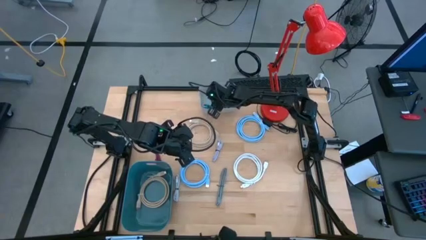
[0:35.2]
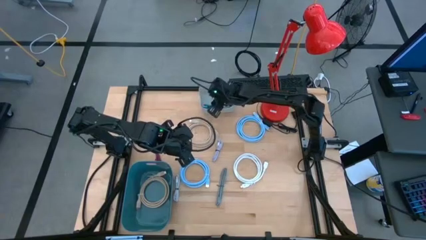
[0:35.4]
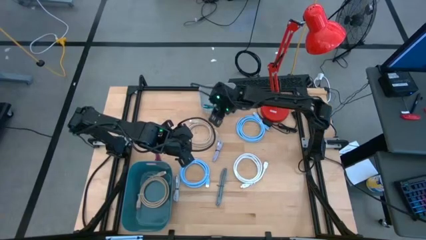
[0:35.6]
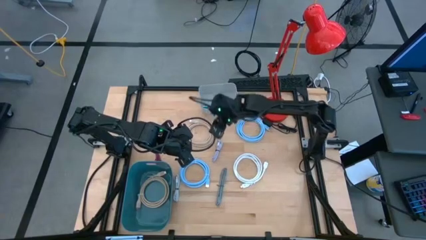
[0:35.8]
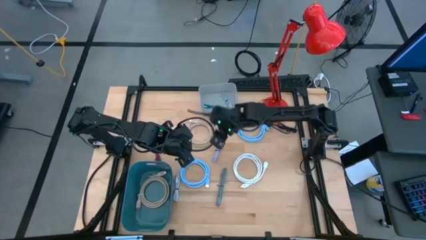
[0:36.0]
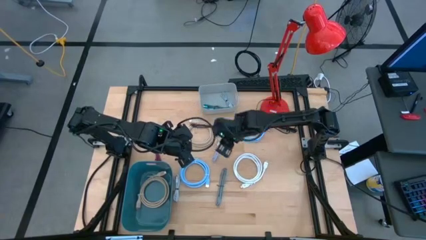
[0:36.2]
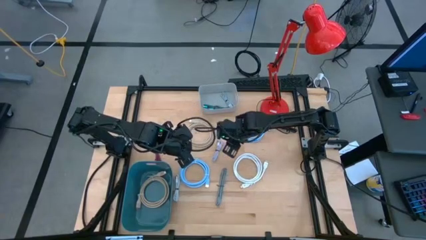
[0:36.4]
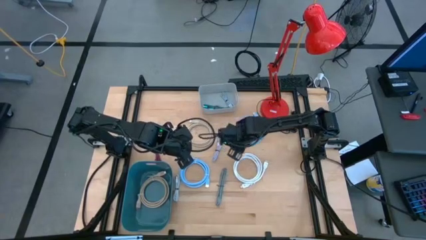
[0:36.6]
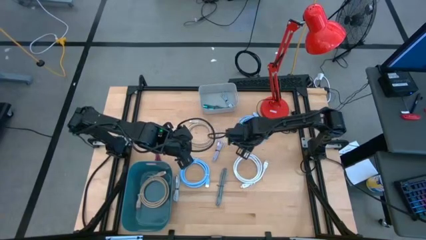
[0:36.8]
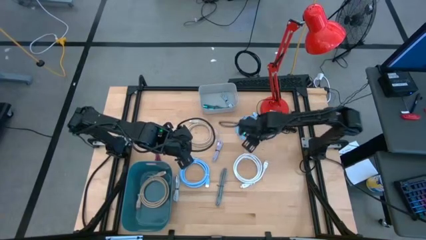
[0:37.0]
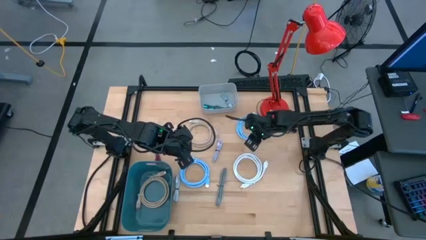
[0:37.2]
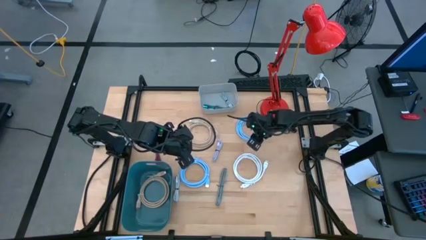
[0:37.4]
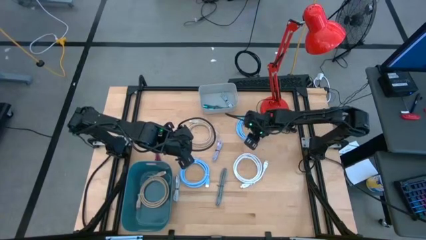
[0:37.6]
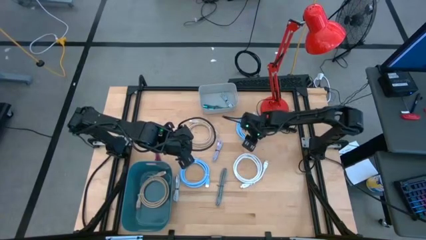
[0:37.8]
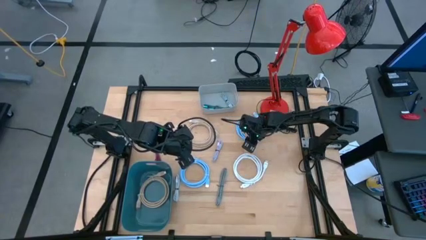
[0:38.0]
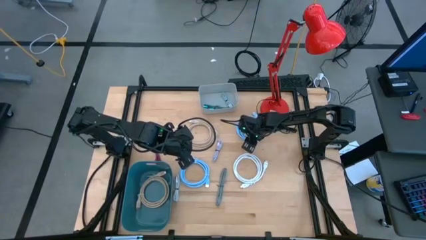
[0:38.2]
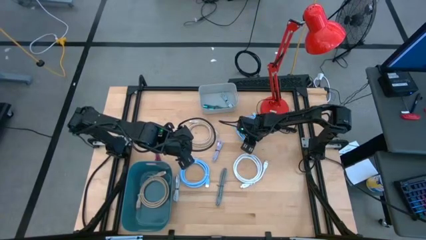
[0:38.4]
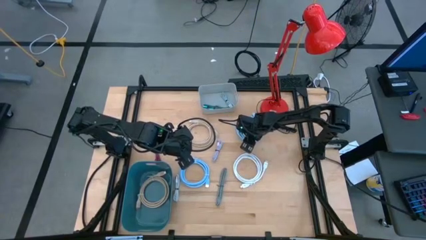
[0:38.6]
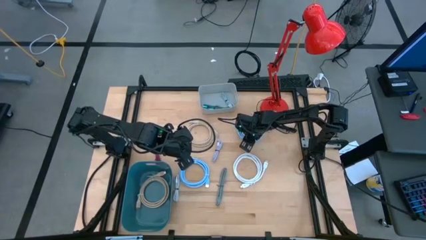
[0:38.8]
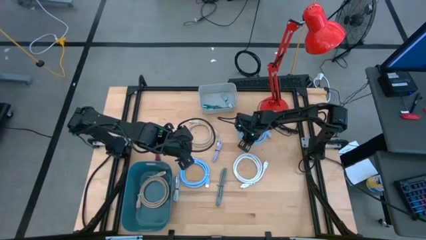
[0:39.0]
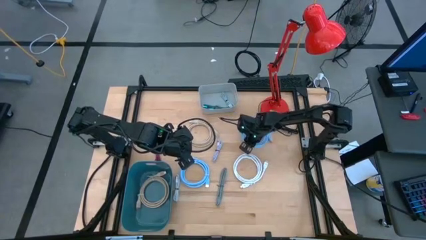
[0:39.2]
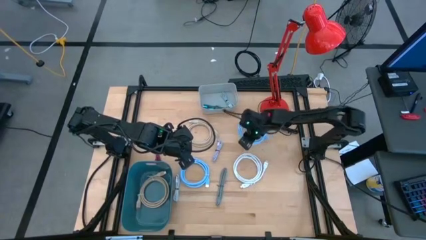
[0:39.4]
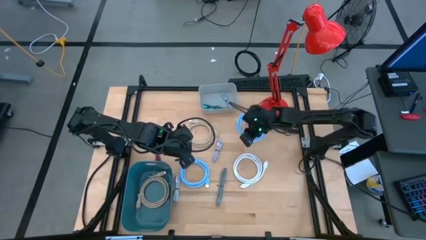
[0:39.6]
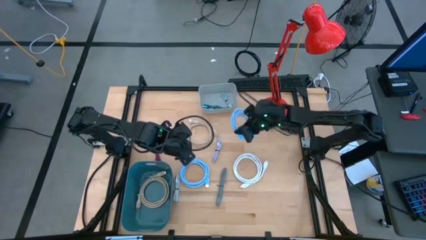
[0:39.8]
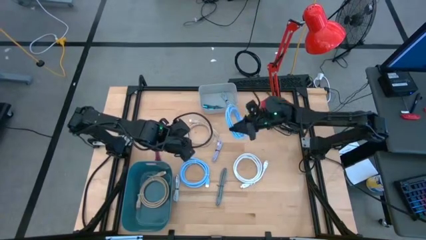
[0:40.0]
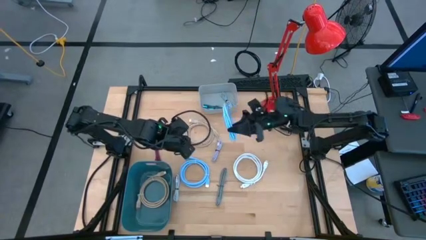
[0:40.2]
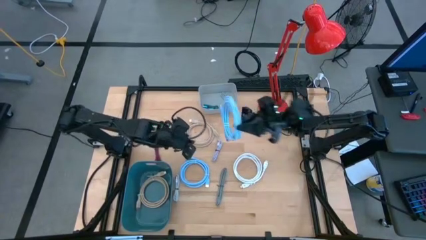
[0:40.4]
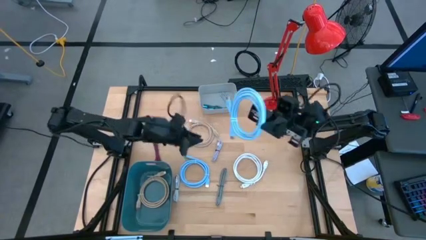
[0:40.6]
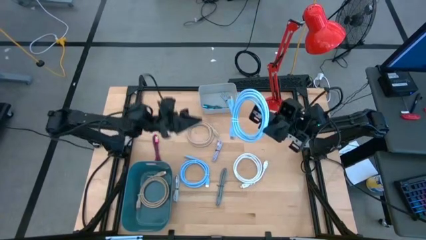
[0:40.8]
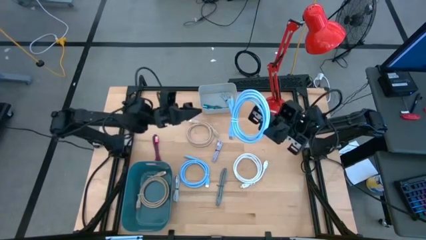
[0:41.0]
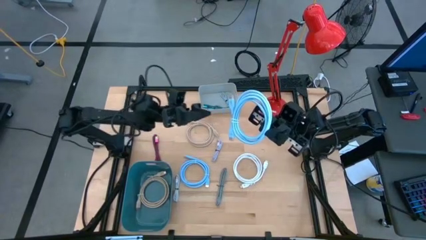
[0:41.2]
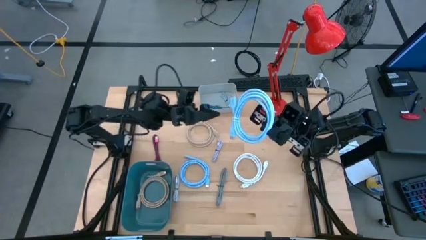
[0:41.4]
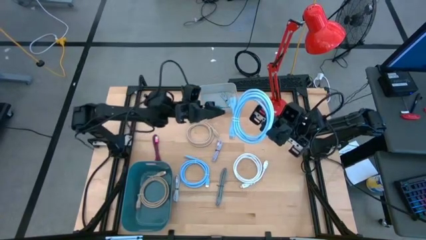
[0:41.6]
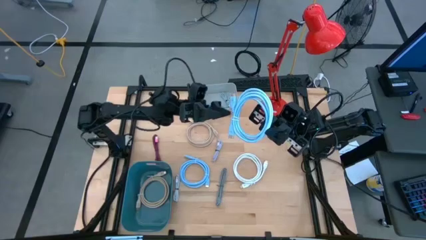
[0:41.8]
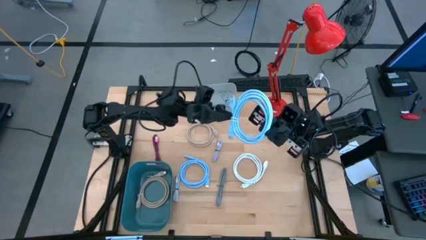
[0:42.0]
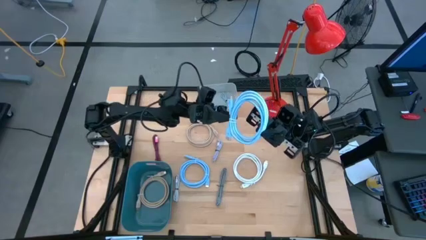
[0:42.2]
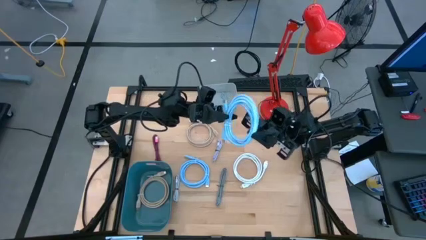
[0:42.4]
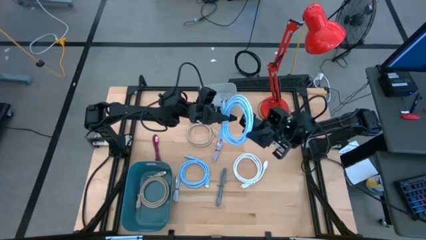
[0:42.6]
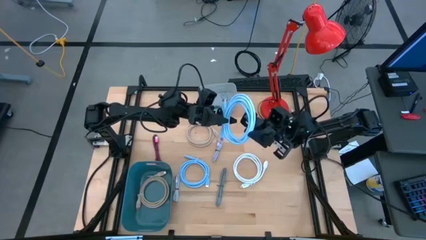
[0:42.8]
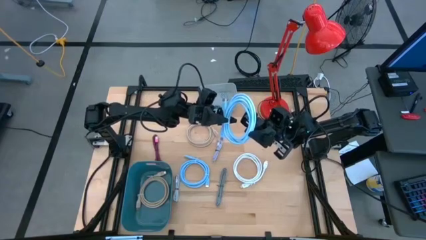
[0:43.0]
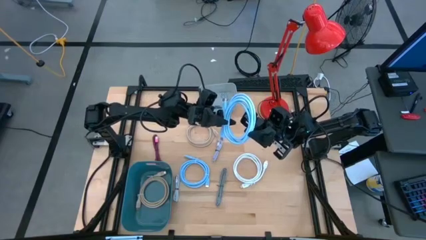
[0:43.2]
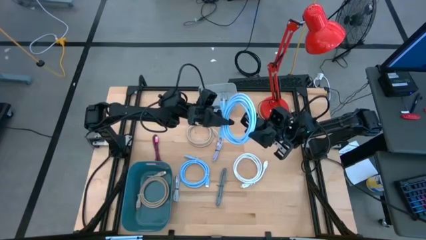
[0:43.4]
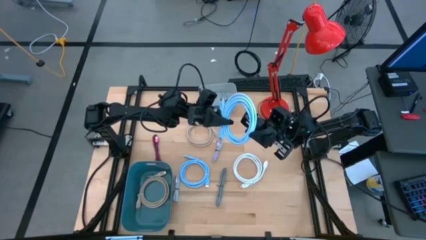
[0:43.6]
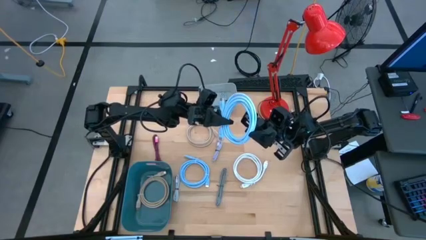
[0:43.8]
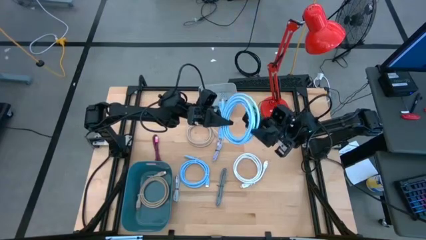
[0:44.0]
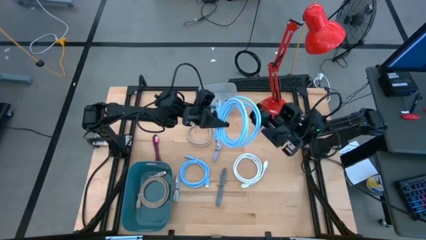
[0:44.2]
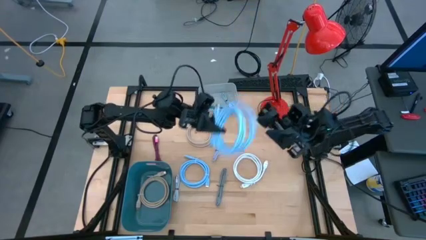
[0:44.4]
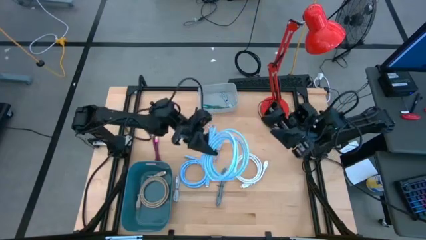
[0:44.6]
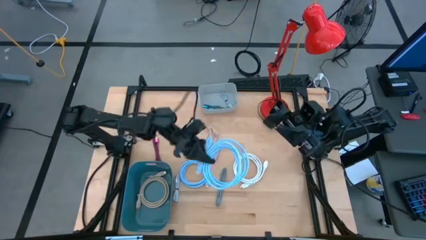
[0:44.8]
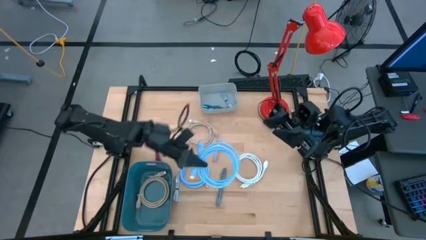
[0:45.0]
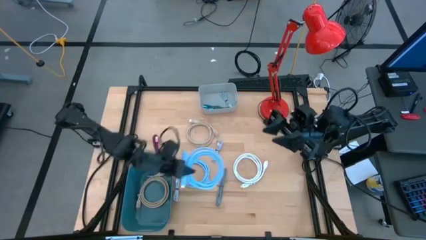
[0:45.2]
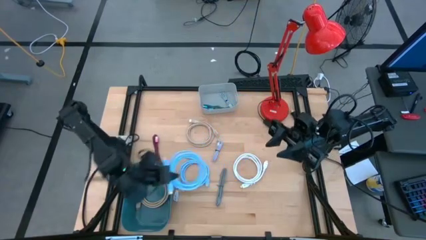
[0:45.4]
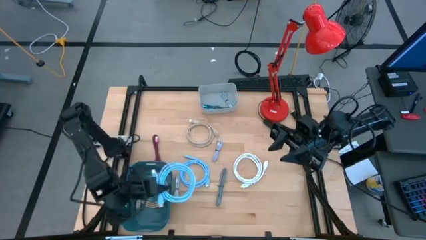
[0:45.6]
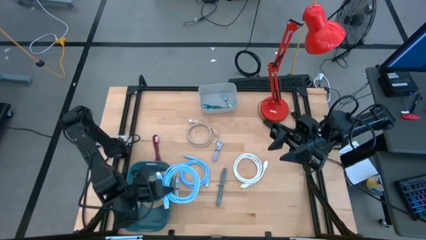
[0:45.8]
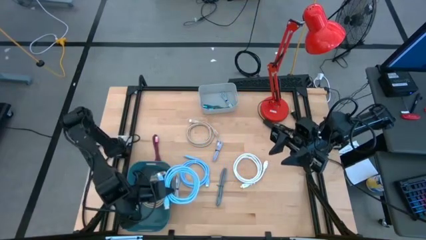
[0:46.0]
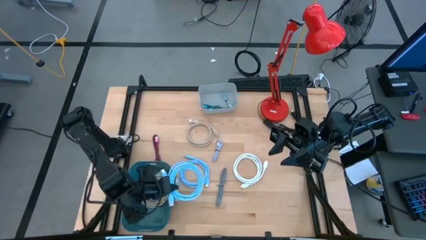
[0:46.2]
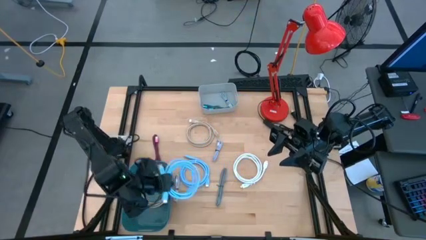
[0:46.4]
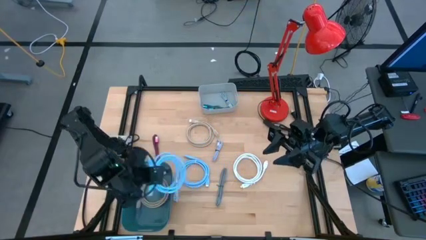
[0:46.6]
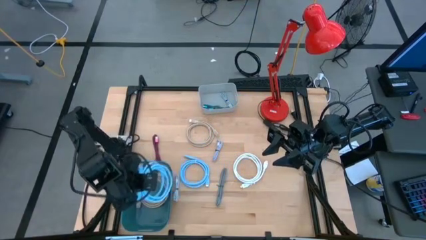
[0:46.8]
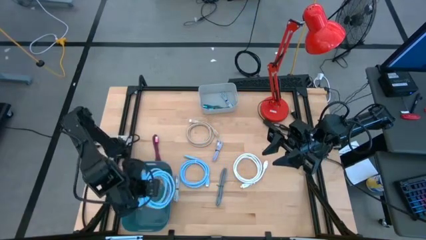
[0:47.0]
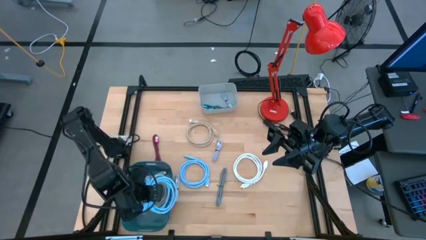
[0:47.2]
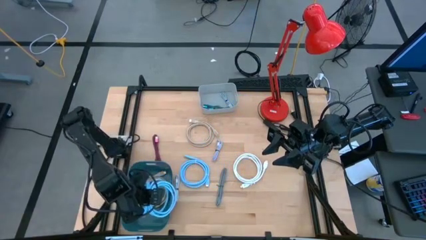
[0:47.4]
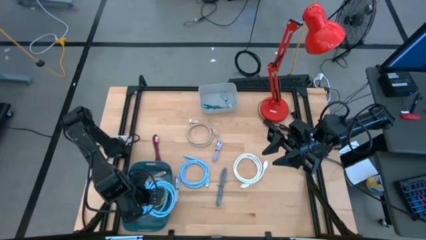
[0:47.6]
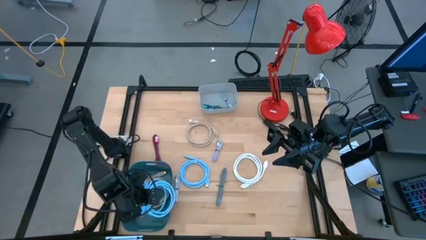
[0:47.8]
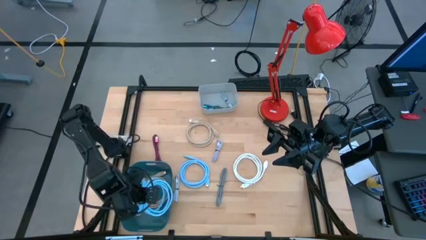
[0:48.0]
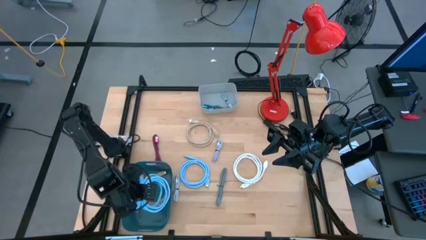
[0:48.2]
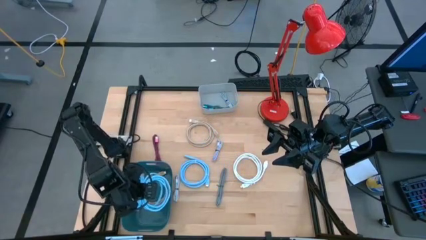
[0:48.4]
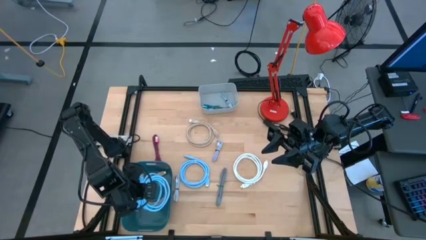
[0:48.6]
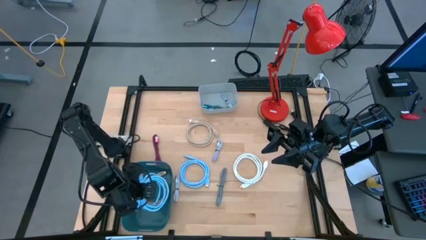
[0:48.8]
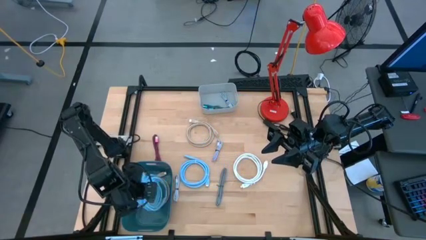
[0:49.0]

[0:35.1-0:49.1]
Task: Pick & Place USB Port
Put the blue HDMI cable into the blue bin
